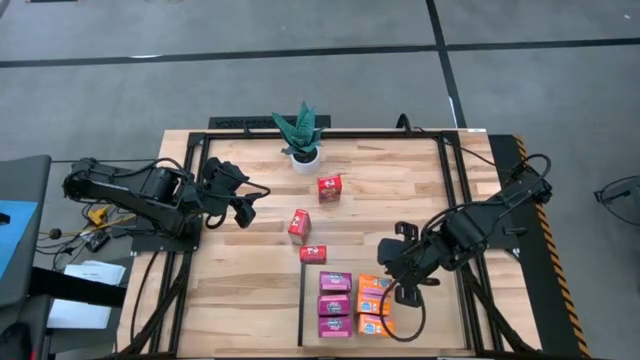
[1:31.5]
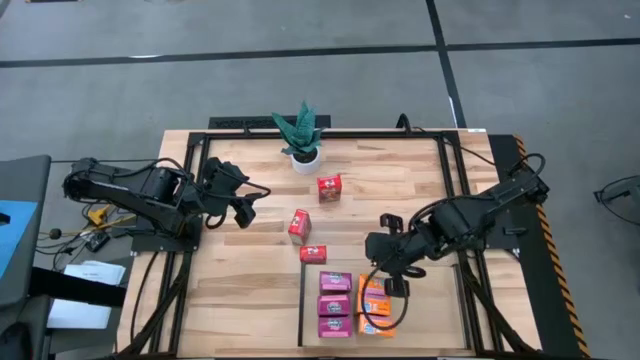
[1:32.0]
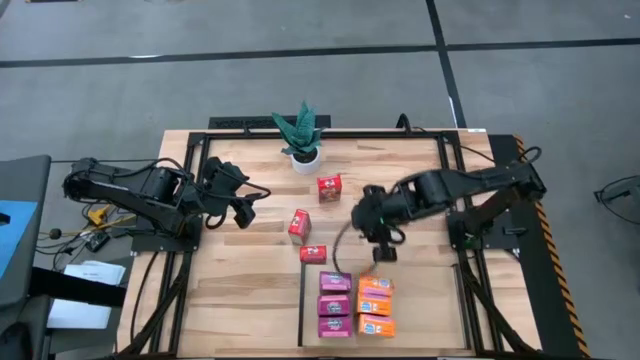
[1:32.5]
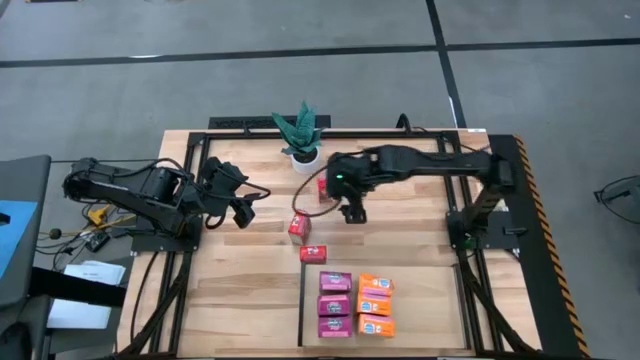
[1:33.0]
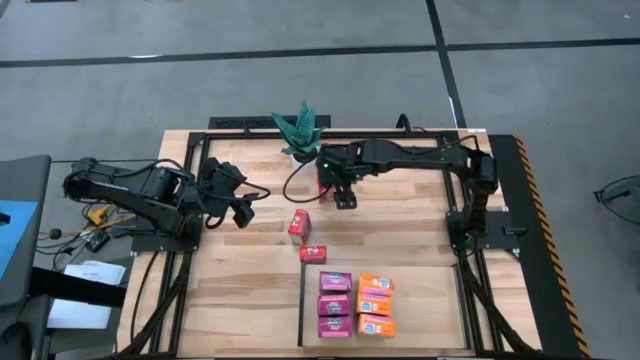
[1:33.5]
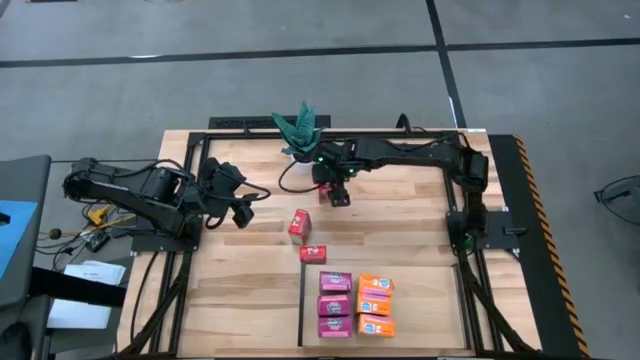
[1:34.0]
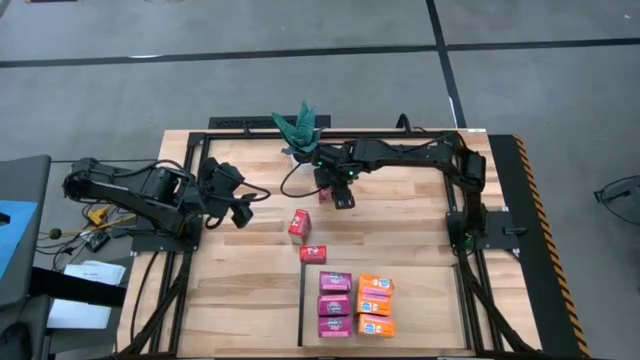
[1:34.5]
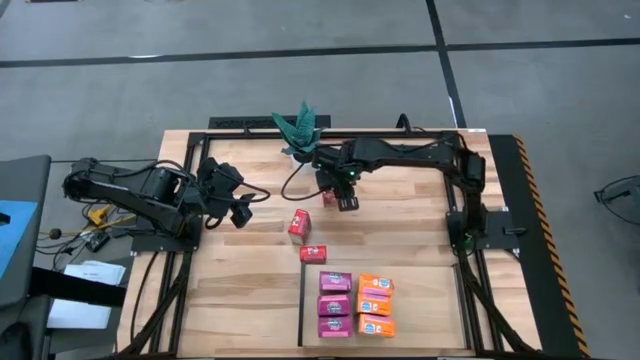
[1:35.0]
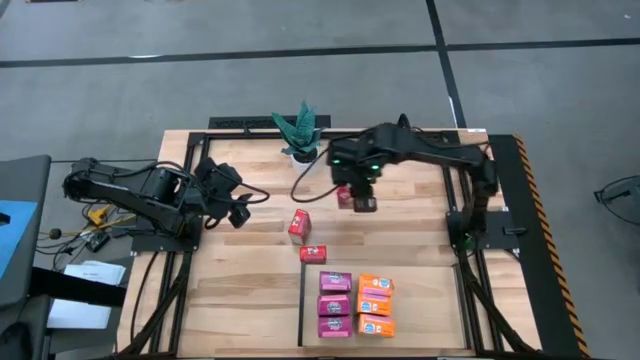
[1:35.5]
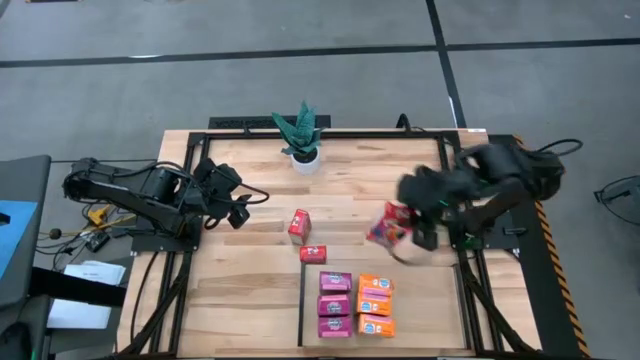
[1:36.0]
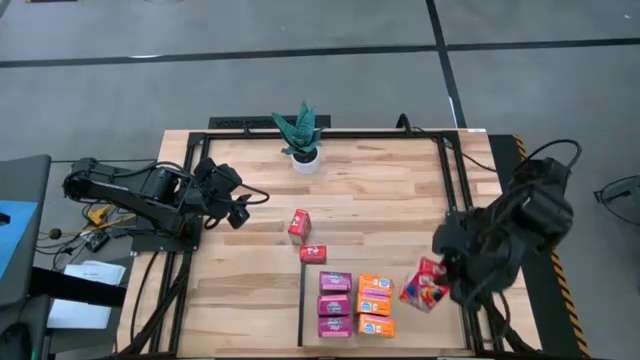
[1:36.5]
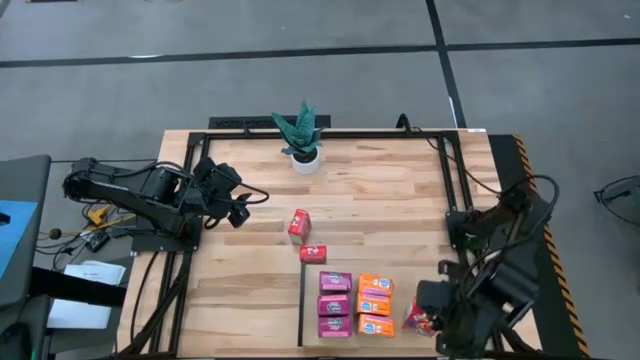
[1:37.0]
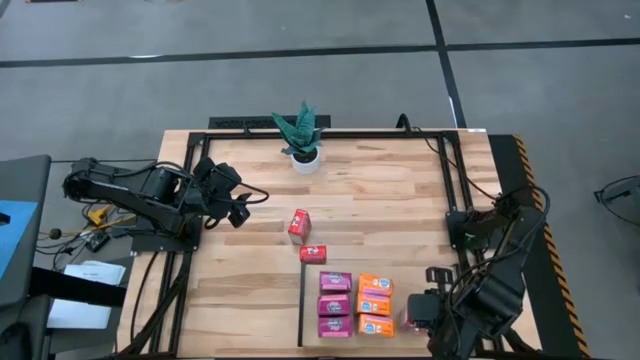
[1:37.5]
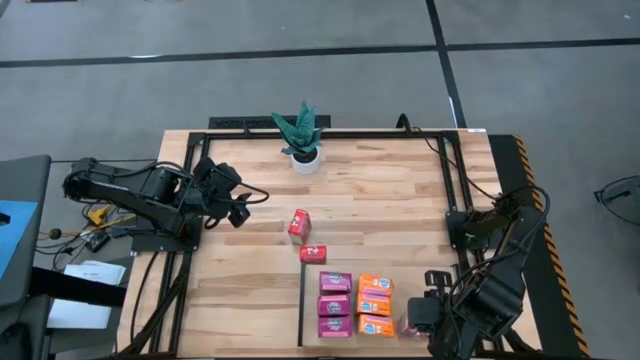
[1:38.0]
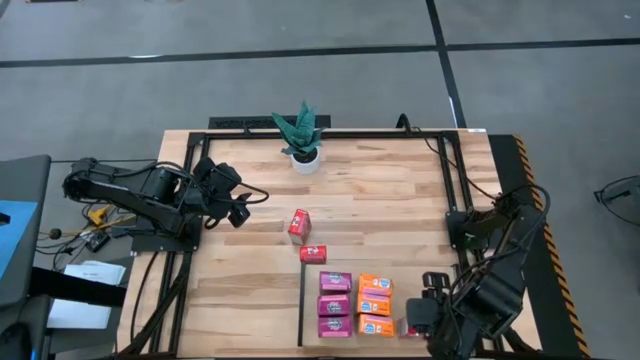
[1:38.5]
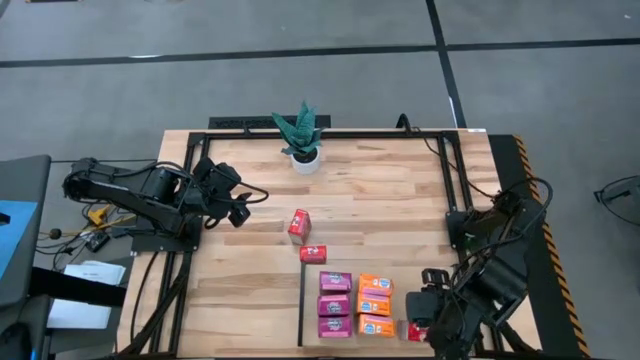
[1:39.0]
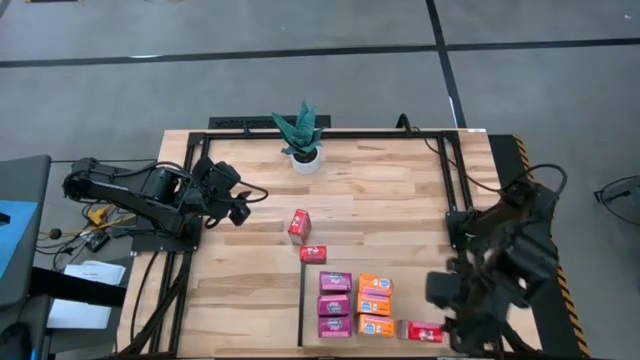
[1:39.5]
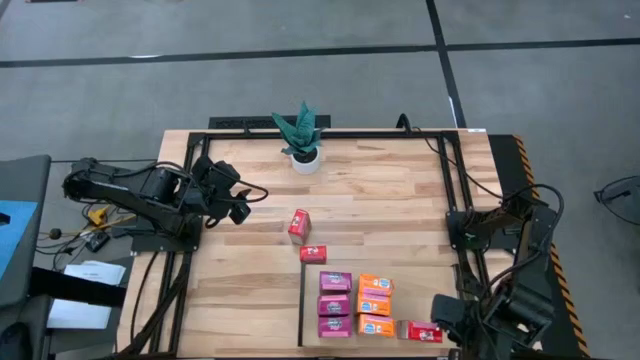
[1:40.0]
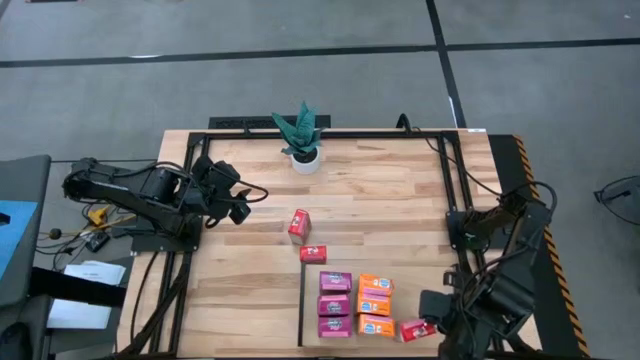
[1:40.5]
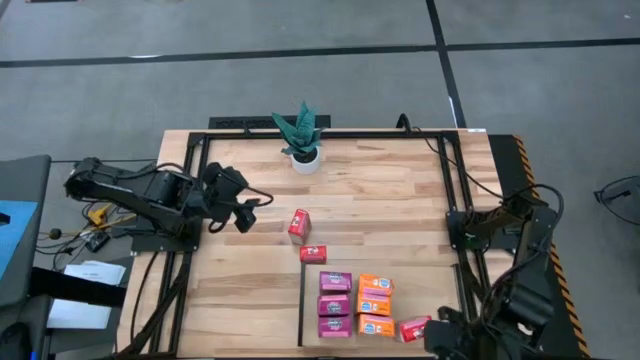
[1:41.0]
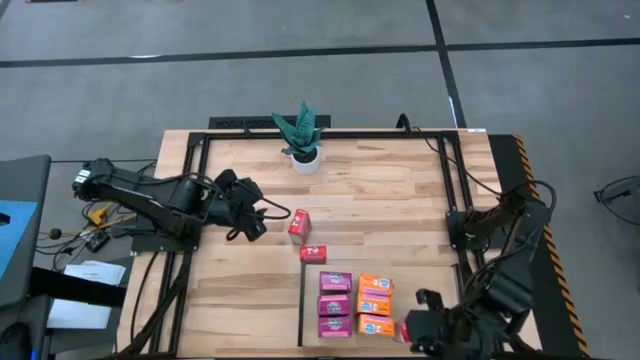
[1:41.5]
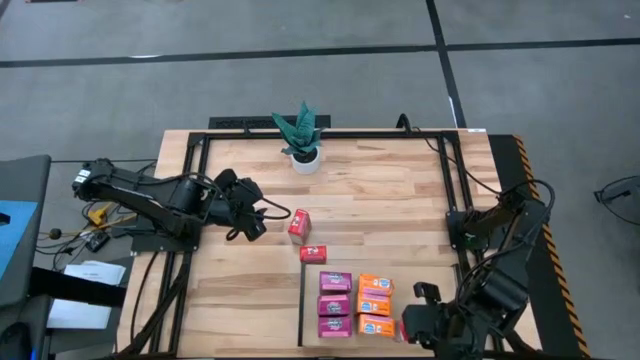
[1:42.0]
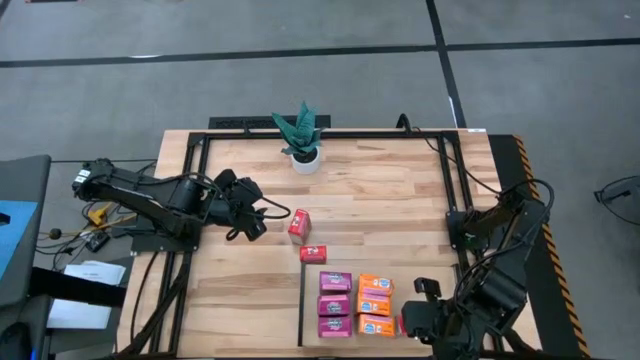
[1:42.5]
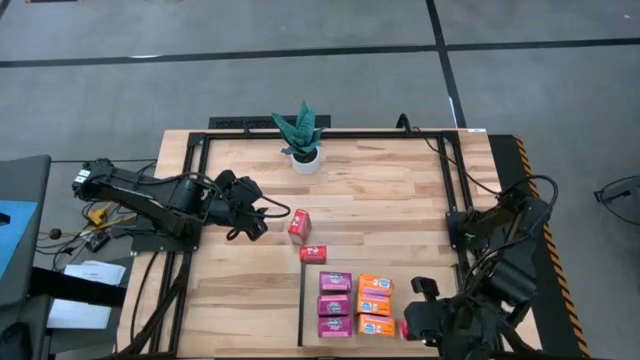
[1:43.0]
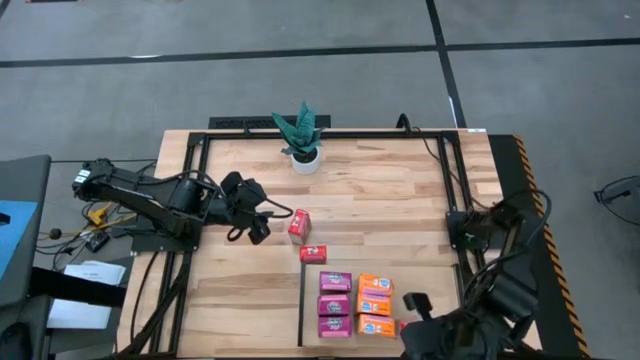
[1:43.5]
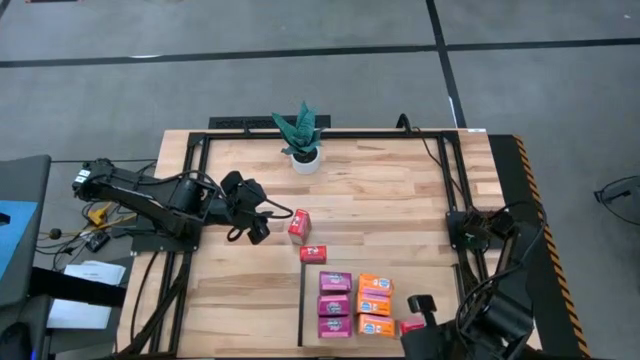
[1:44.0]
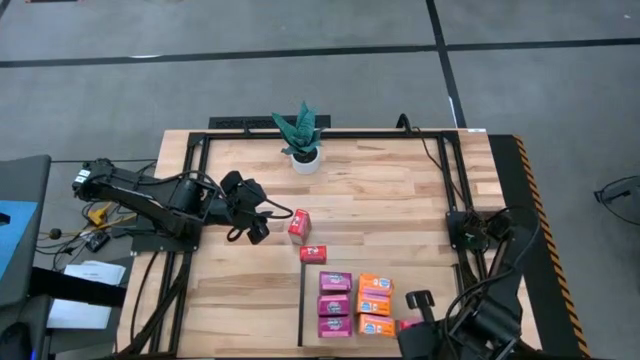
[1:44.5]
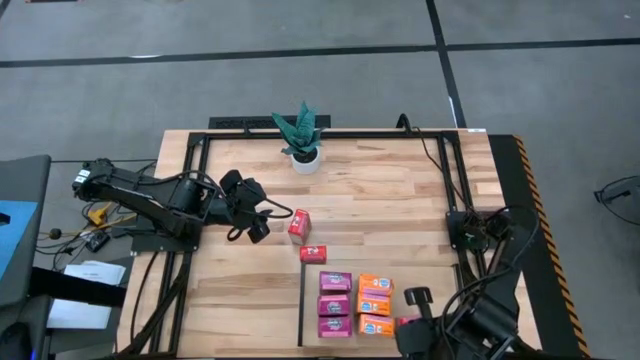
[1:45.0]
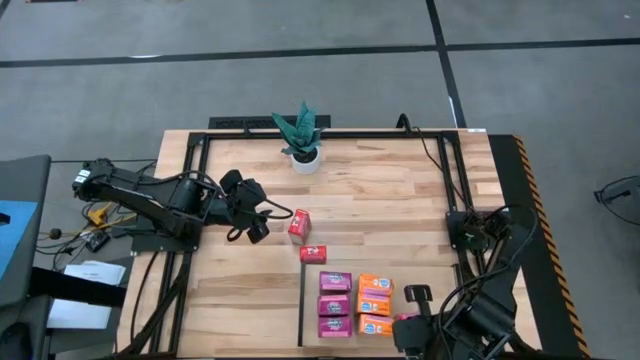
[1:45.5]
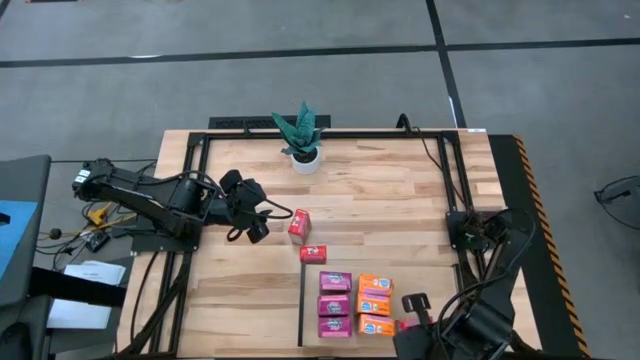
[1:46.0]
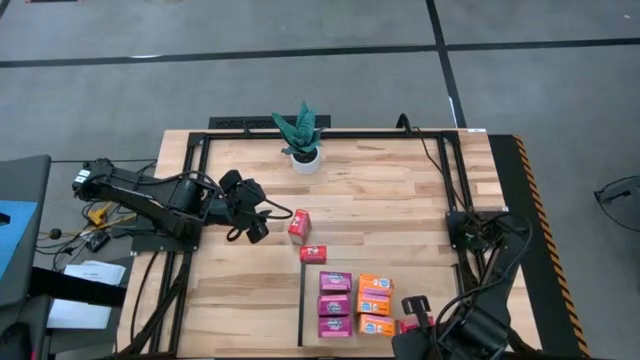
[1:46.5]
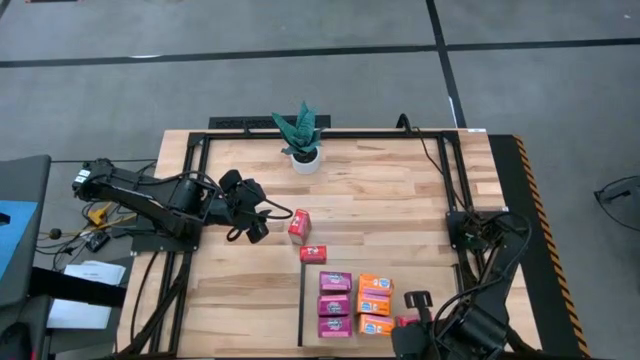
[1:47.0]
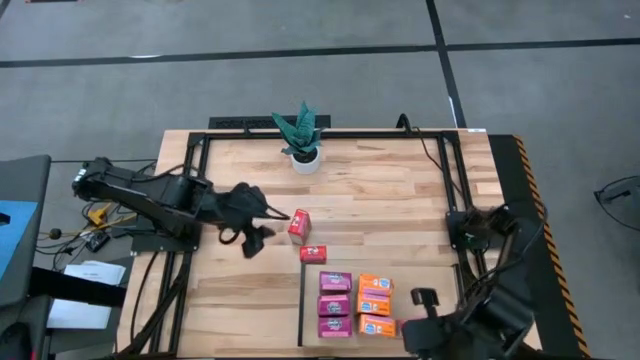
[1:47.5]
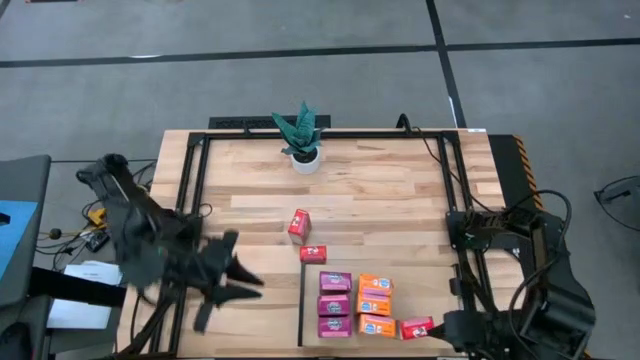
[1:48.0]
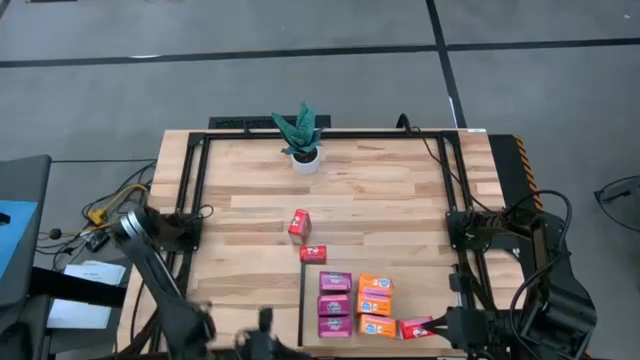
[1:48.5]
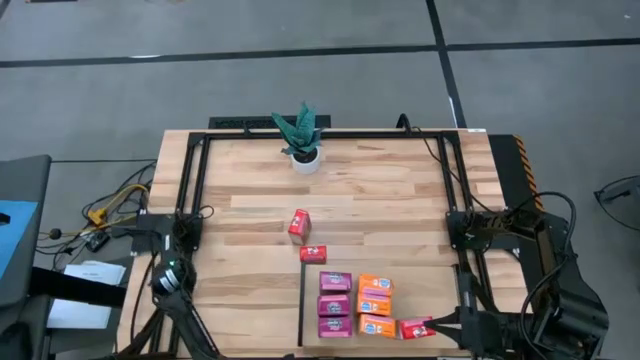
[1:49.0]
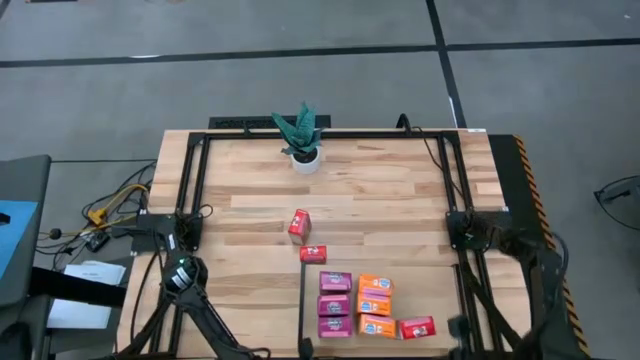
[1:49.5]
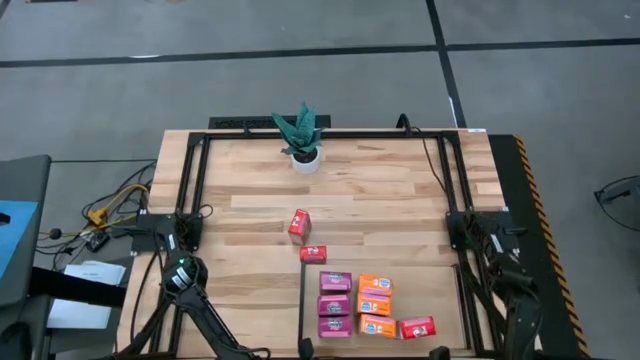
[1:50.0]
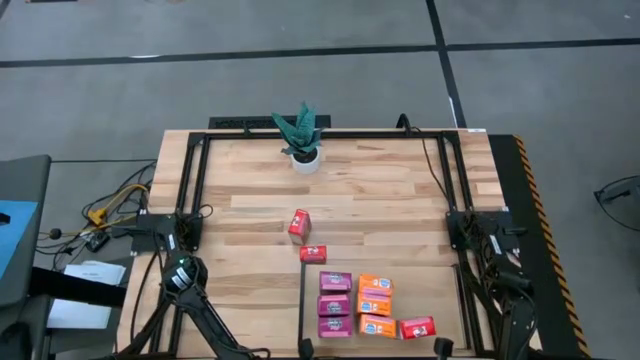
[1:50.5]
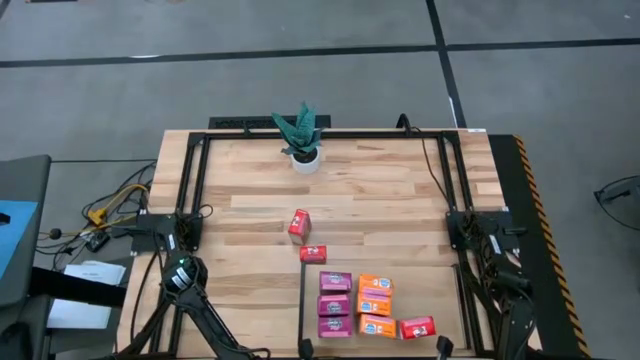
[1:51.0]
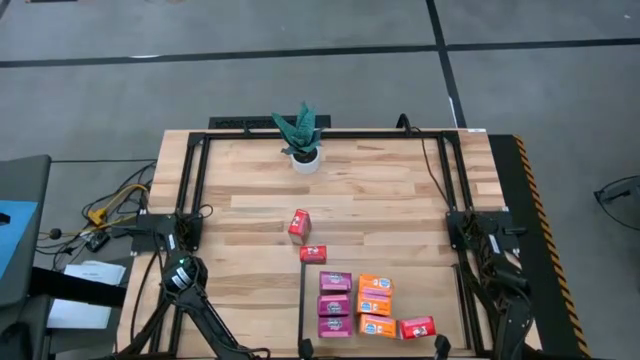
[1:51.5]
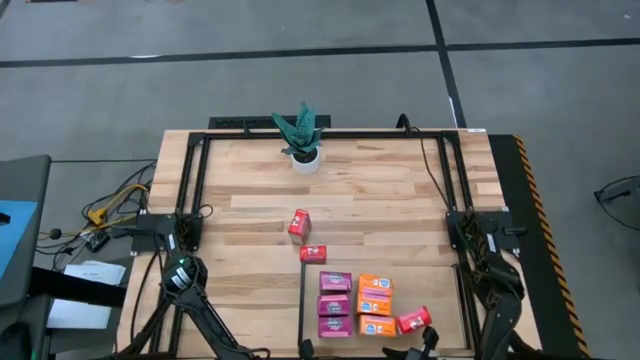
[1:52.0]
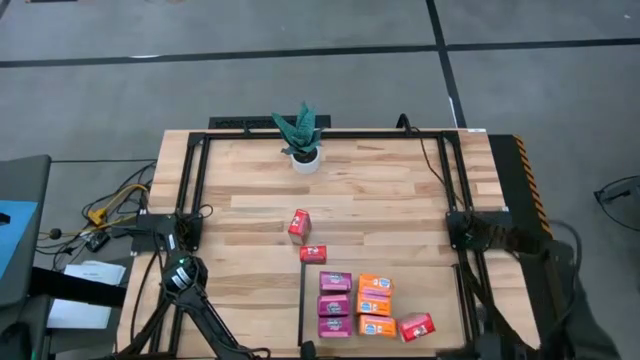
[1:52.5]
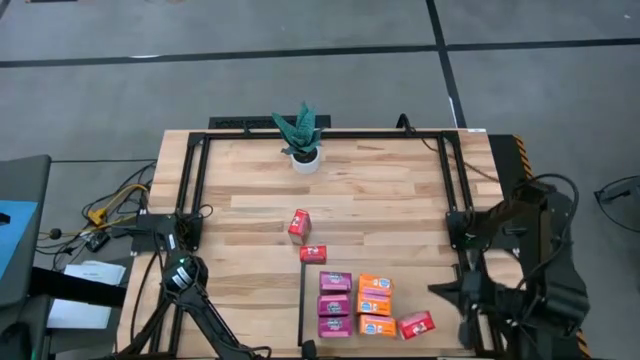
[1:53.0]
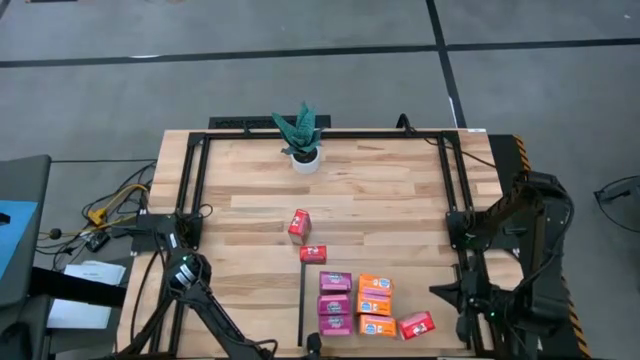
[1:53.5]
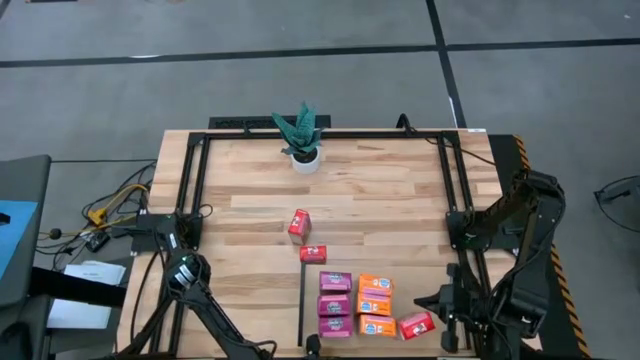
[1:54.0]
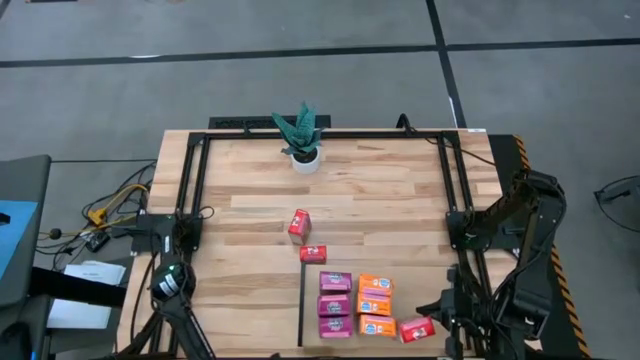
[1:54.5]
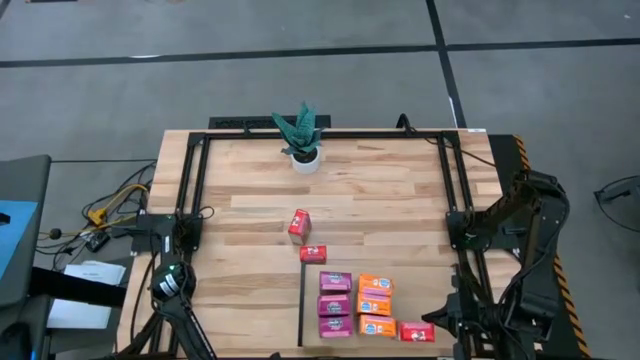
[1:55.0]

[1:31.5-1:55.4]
Task: Stack cereal on shelf
Put the red cereal box on the bottom right shelf
